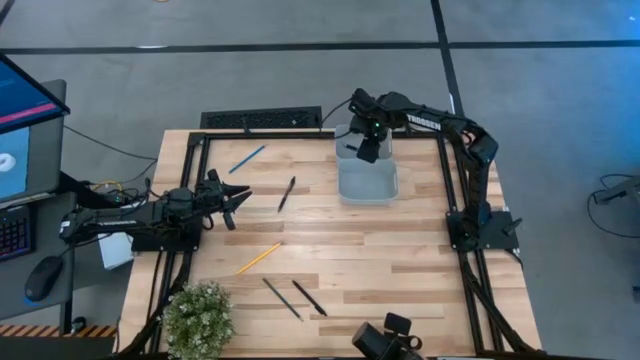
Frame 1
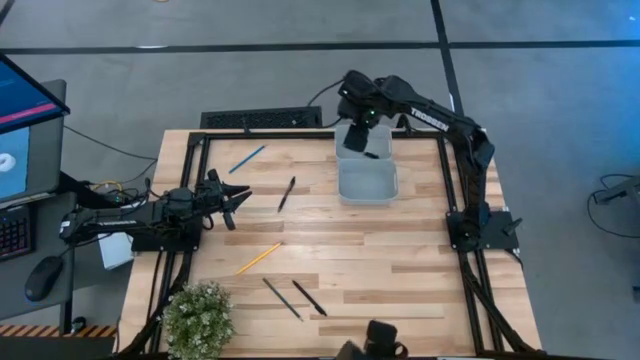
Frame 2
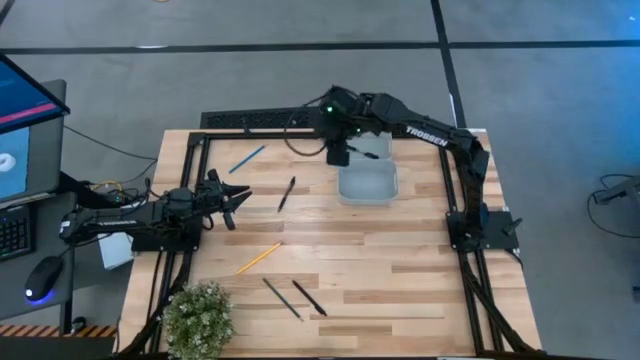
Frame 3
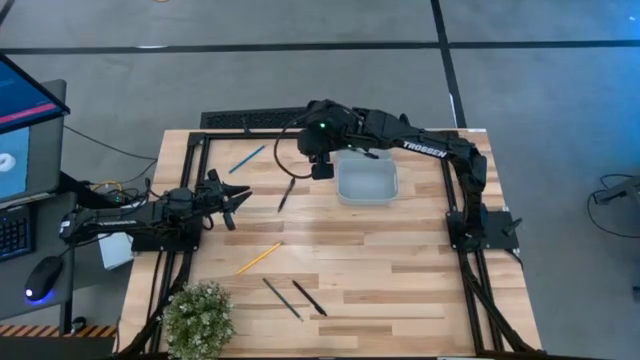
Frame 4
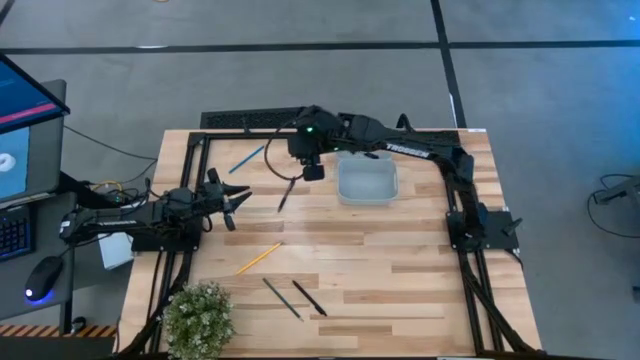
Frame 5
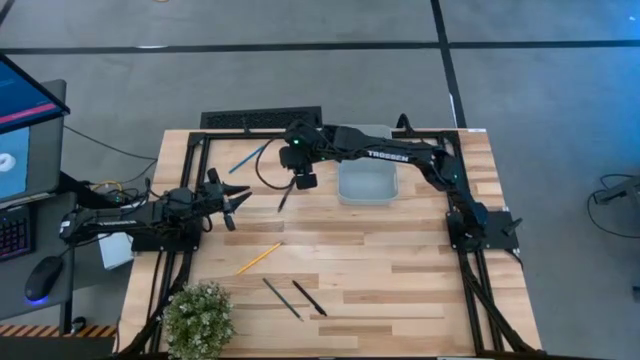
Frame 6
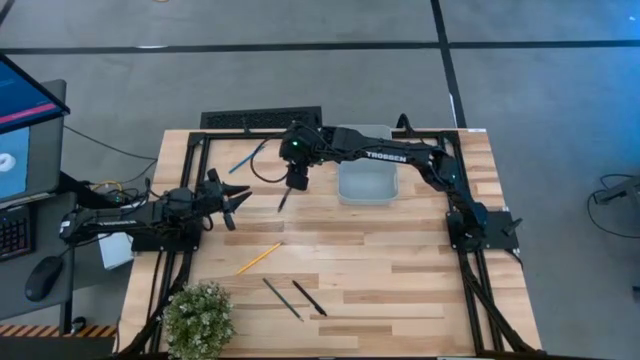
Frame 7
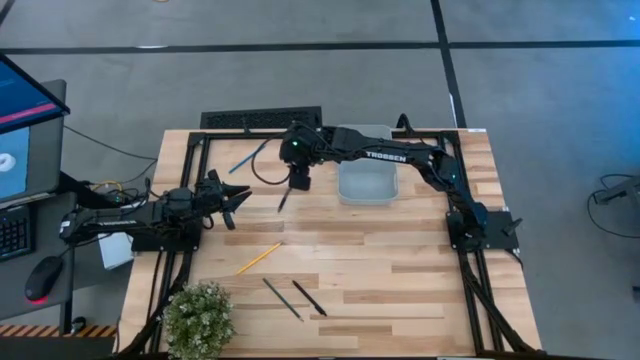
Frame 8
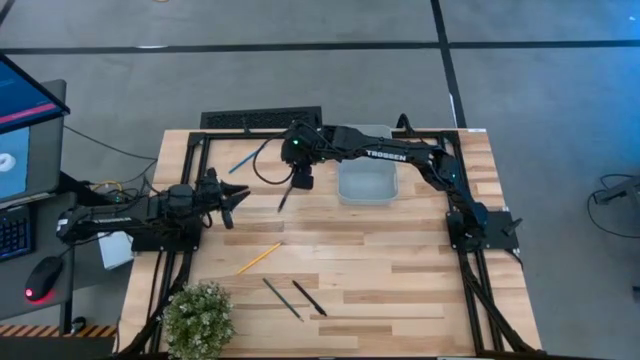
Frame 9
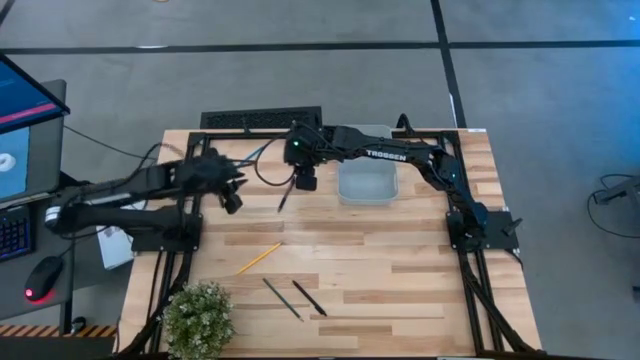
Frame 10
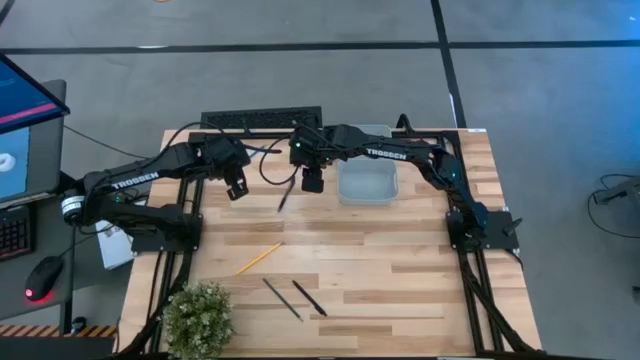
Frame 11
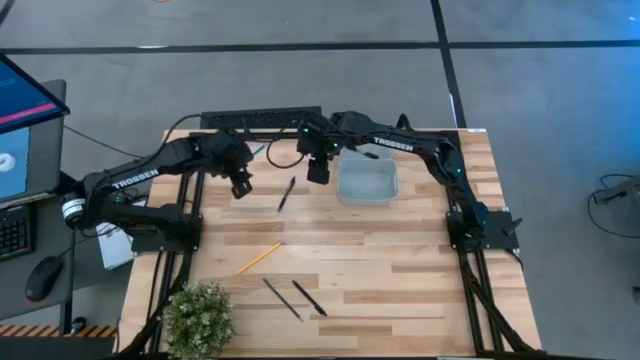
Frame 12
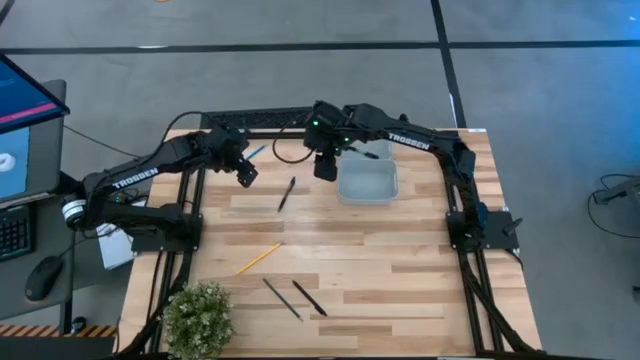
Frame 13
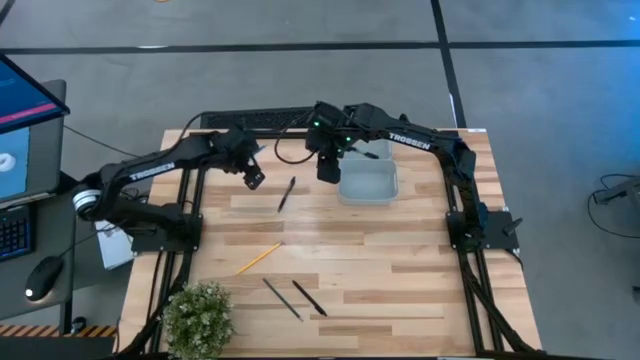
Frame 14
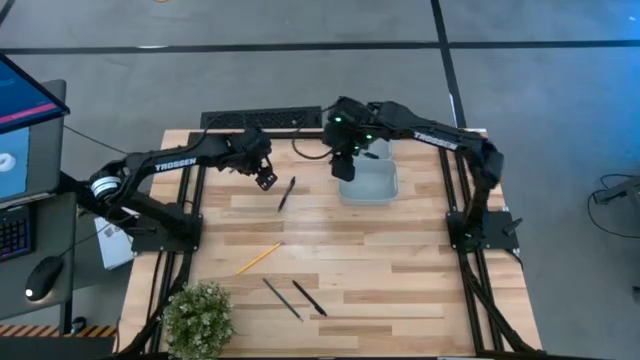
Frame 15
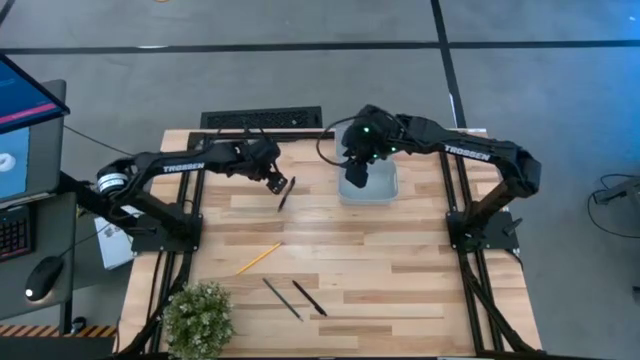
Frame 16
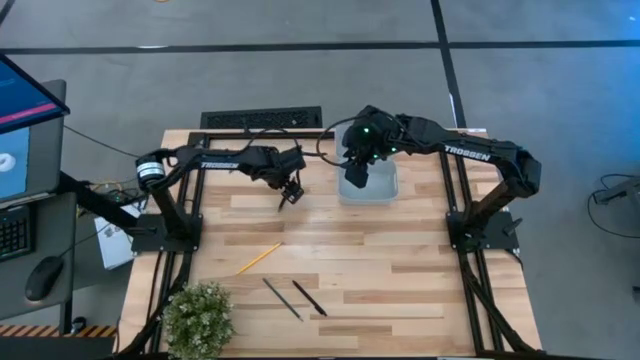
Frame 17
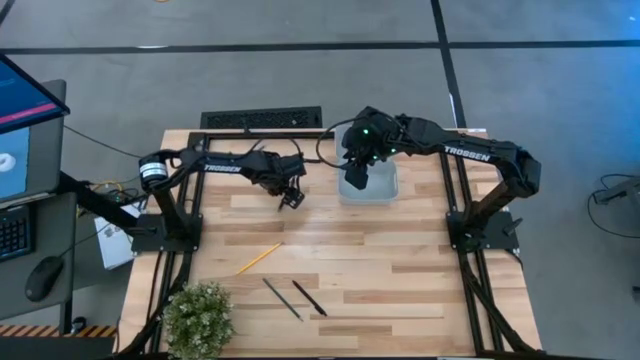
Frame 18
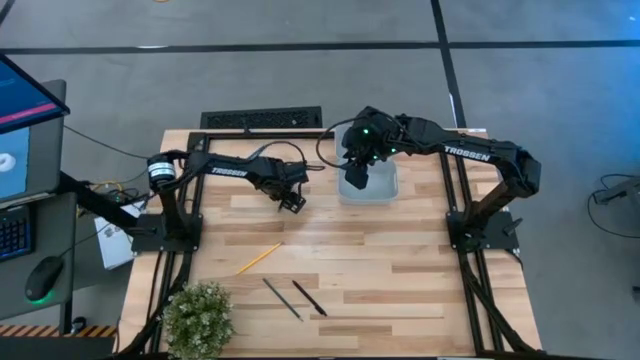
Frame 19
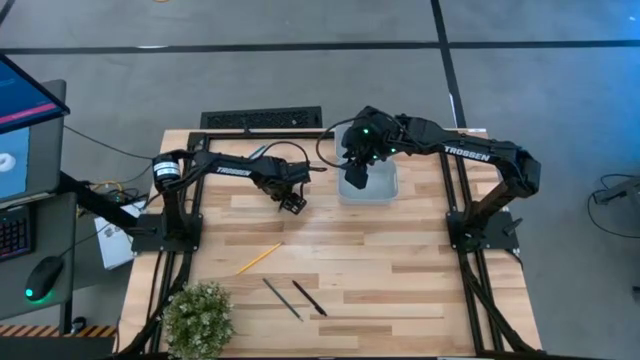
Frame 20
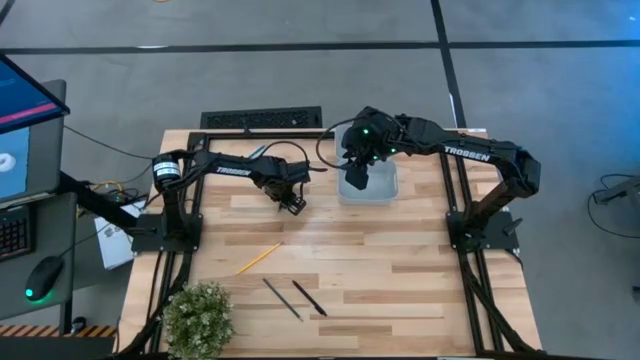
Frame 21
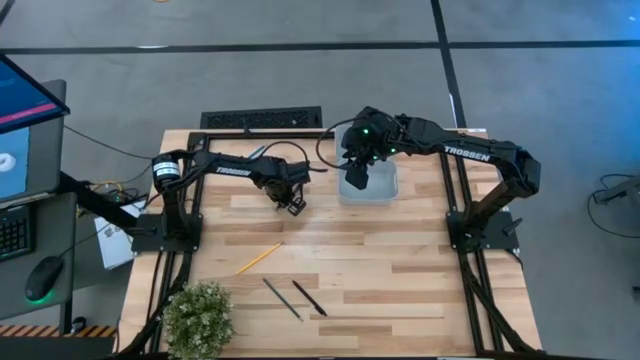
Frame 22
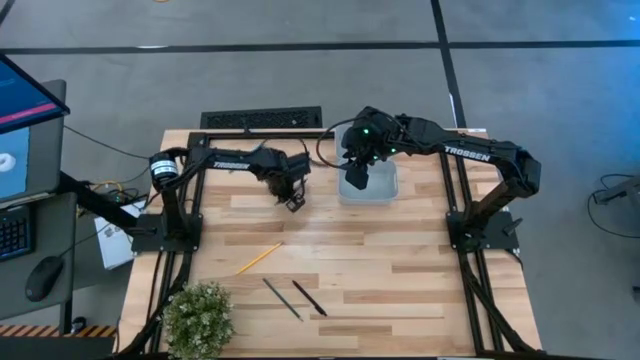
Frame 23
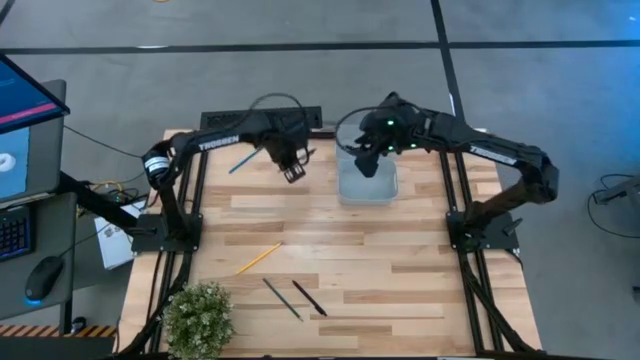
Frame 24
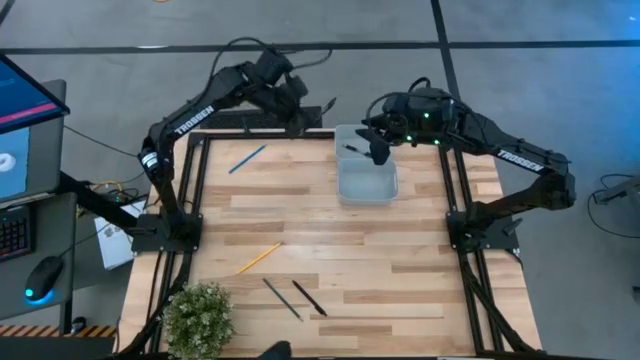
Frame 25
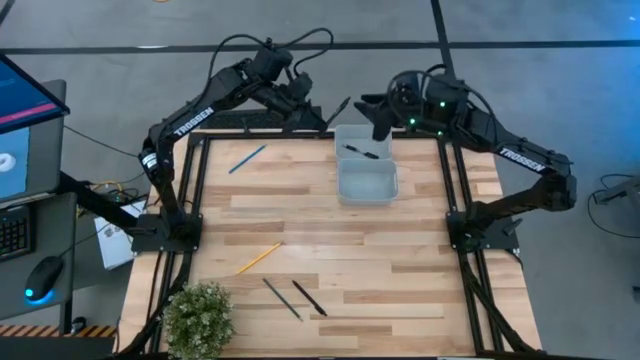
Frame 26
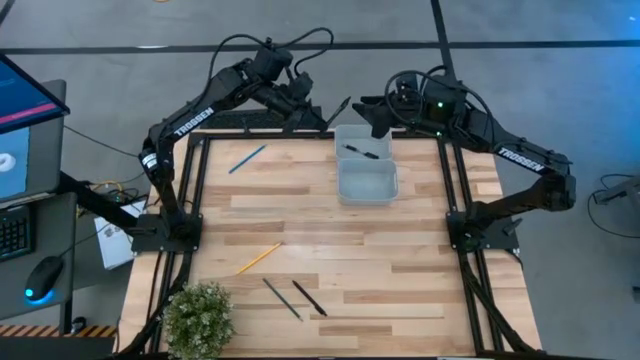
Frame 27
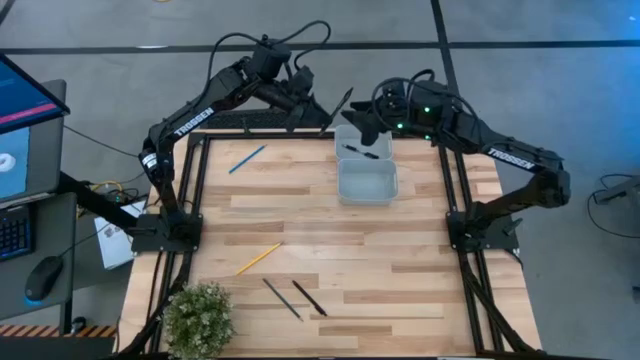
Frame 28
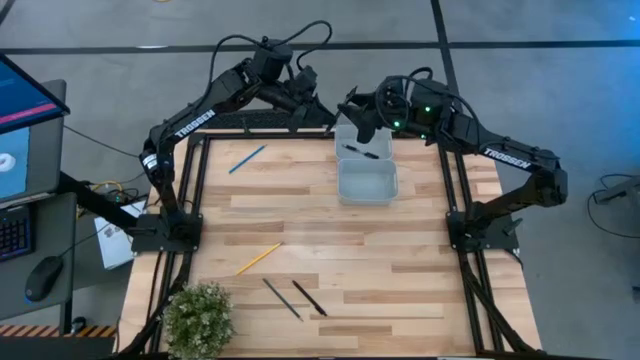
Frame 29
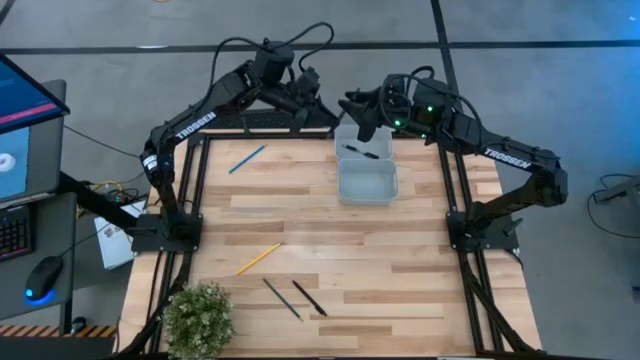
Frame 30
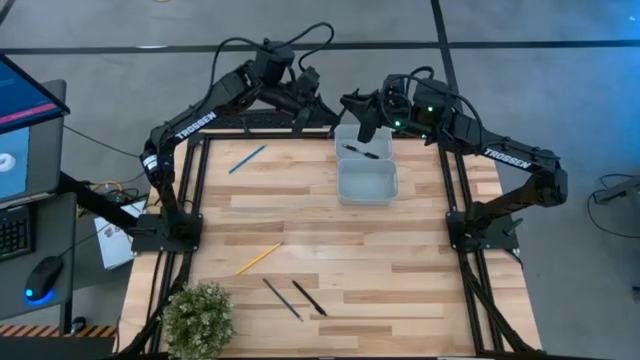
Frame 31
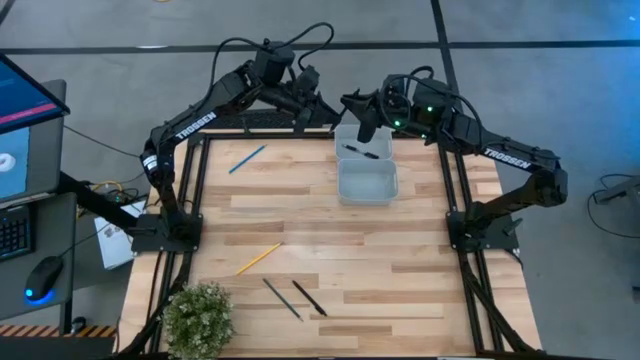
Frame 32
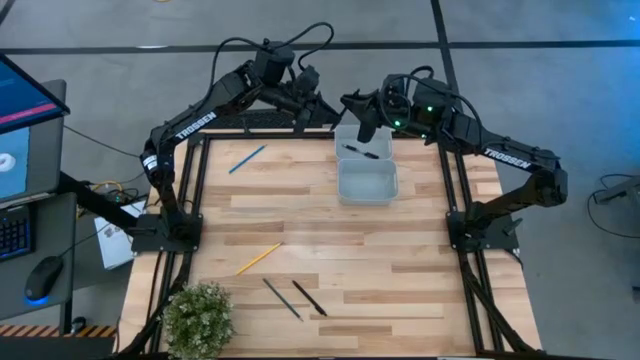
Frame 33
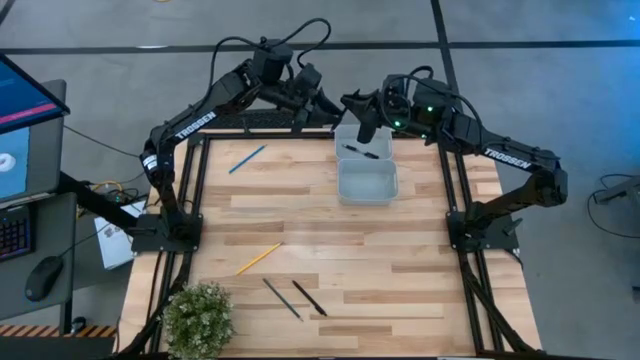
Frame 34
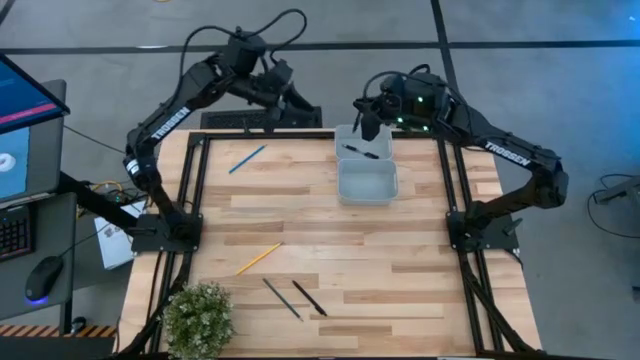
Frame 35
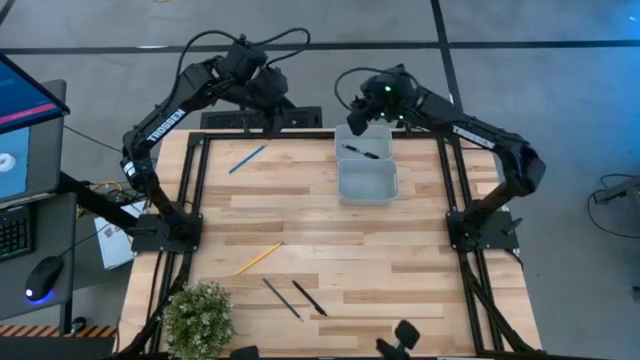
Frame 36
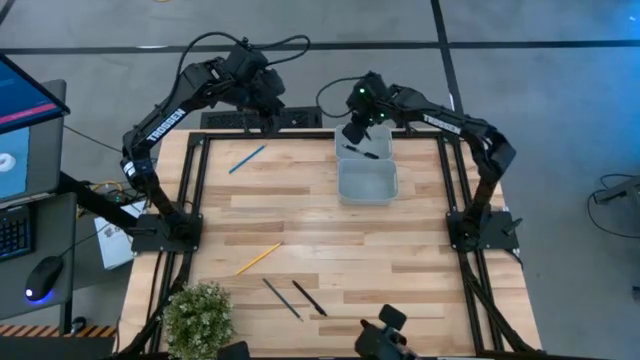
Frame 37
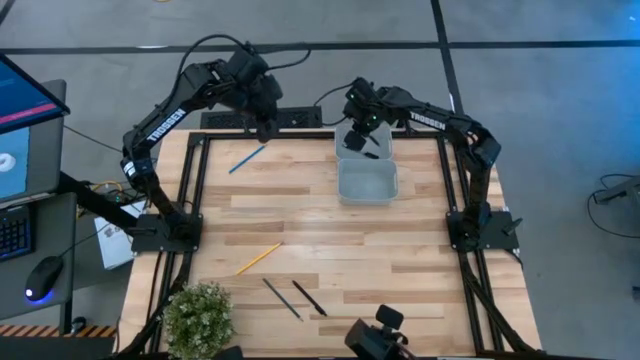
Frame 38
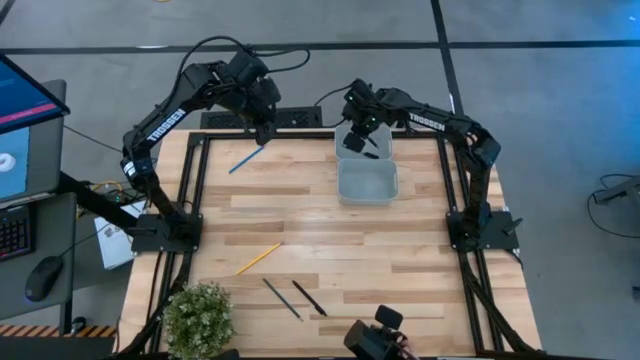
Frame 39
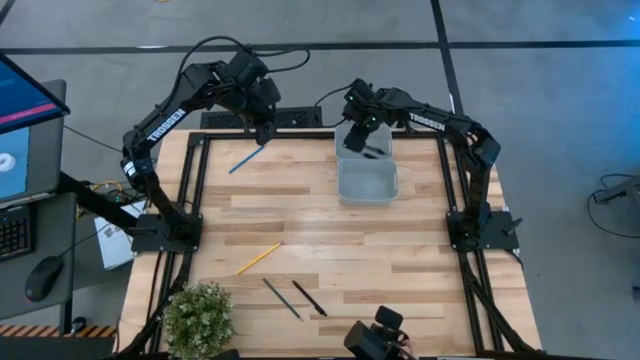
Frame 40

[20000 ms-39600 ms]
Task: Sort pens & pencils
Put the top black pen into the top bin

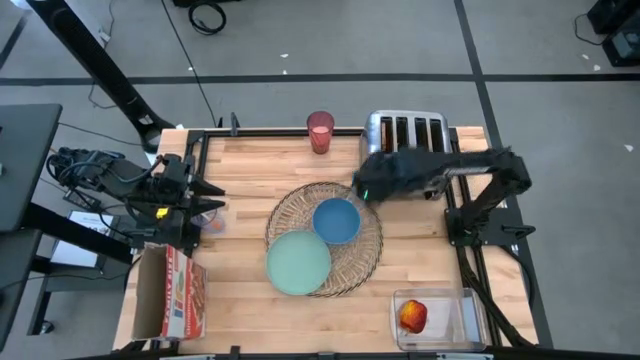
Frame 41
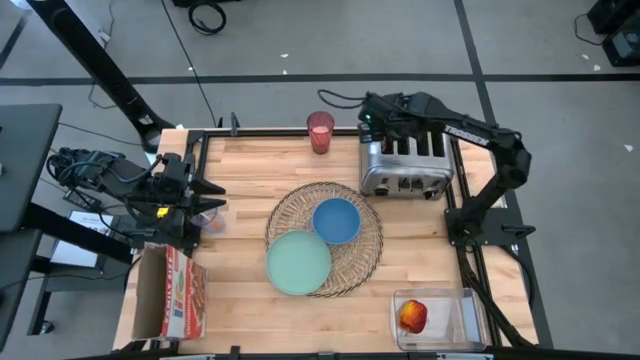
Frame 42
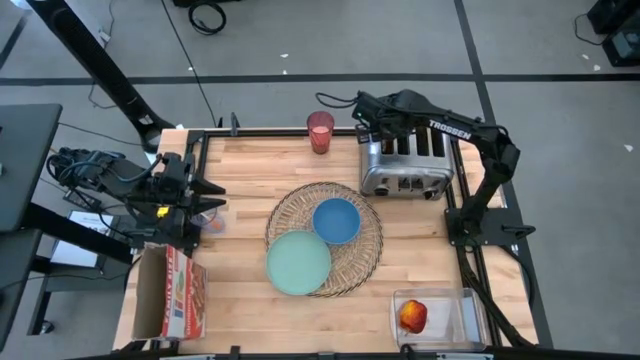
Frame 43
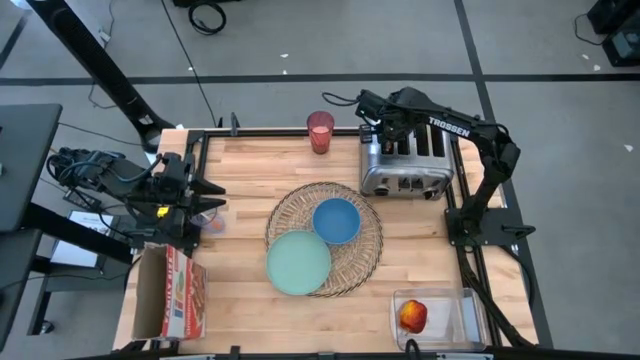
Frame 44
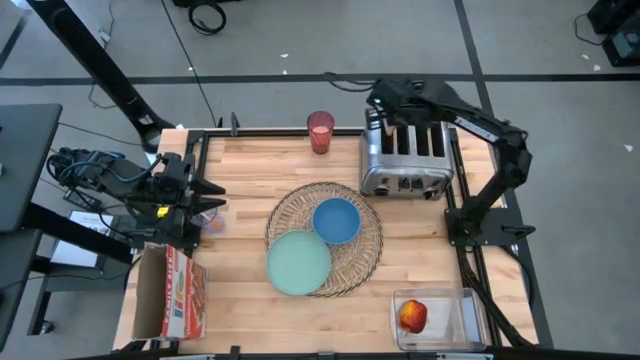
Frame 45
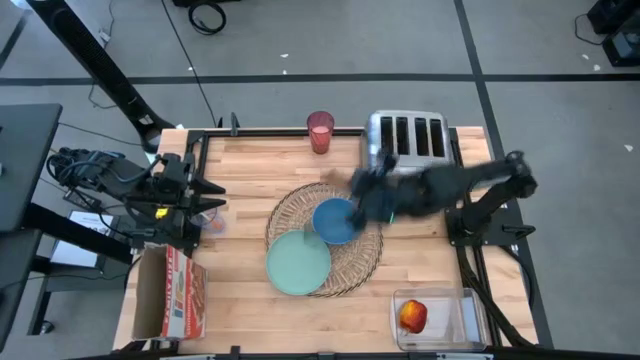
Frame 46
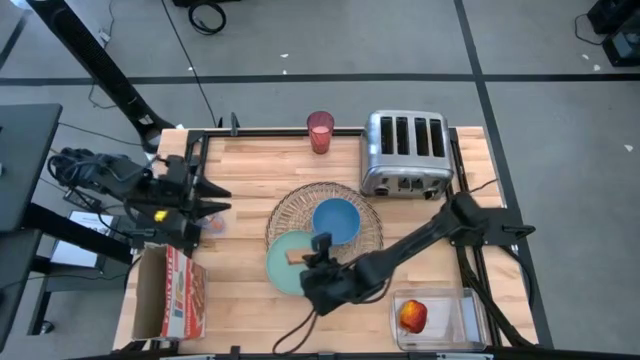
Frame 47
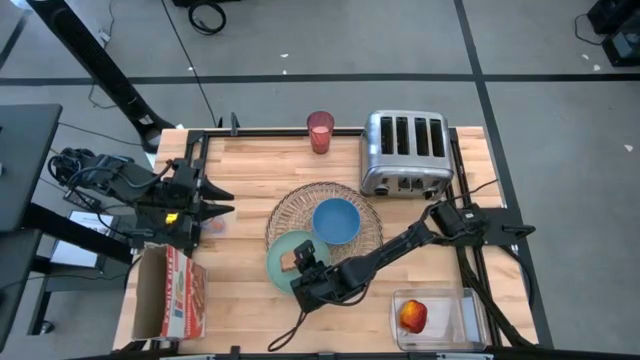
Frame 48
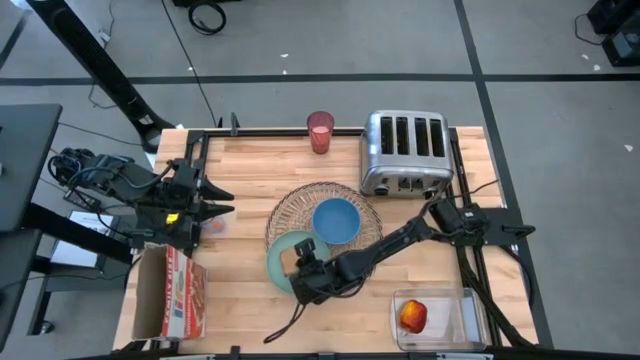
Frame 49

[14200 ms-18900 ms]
Task: Arrange a breakfast setting
Put the toasted bread on the green plate
